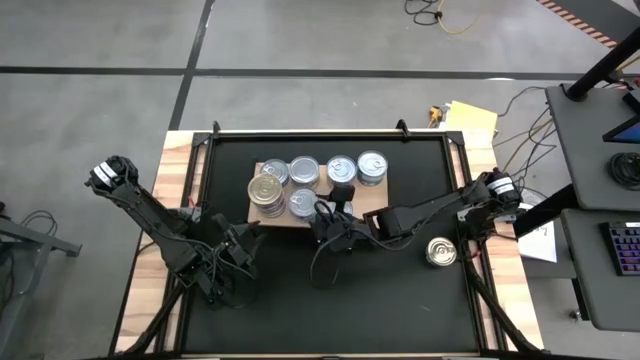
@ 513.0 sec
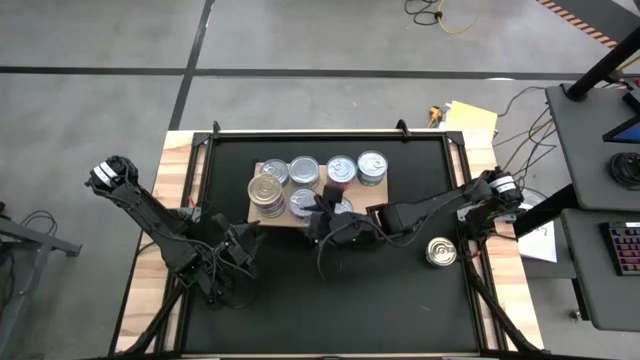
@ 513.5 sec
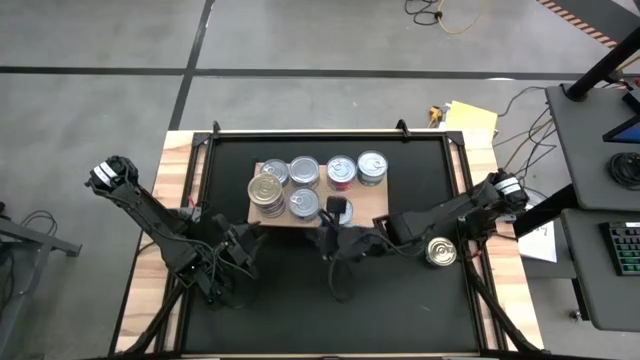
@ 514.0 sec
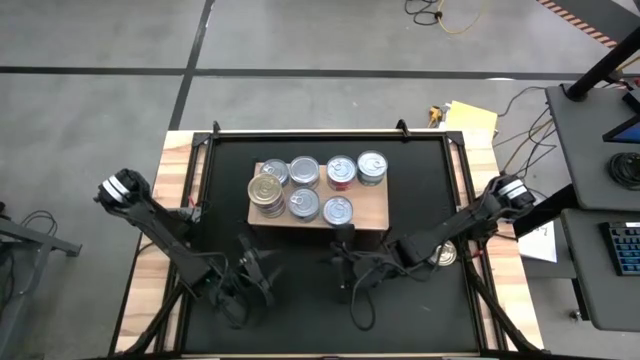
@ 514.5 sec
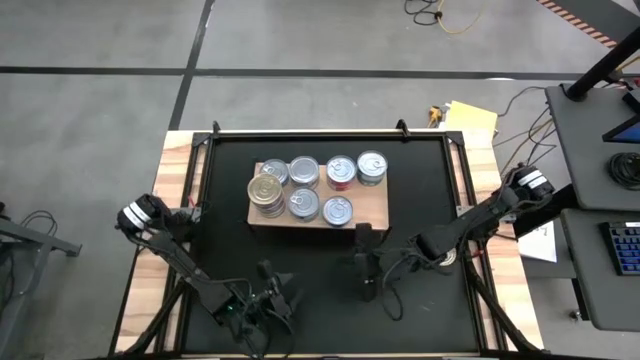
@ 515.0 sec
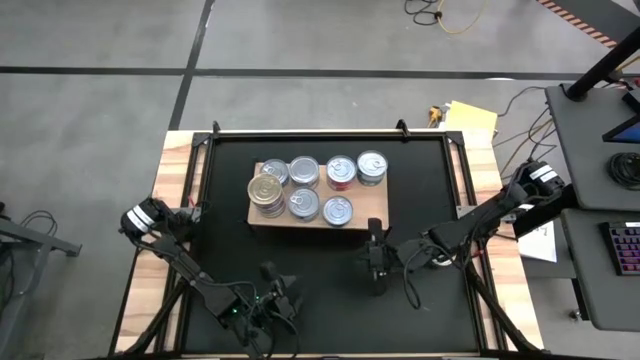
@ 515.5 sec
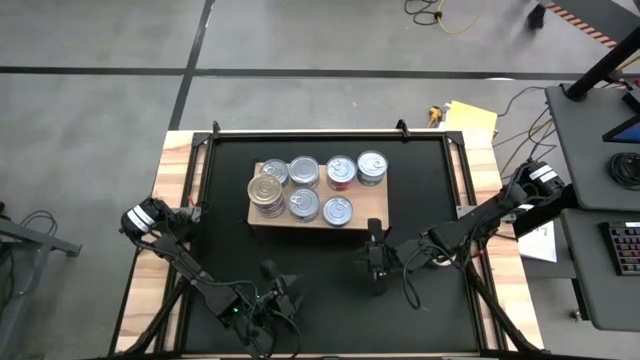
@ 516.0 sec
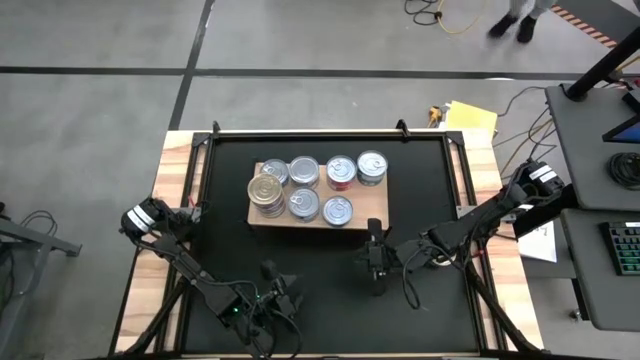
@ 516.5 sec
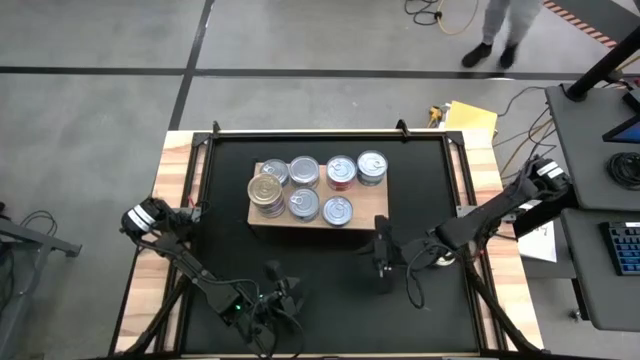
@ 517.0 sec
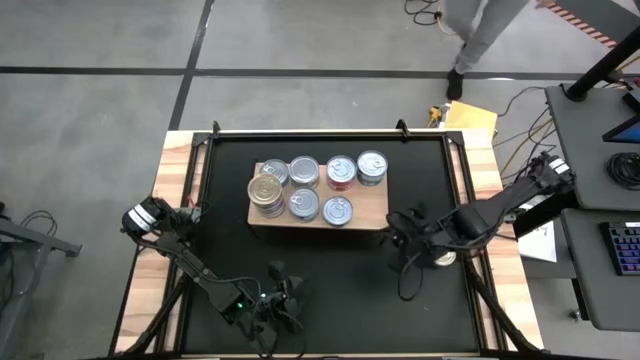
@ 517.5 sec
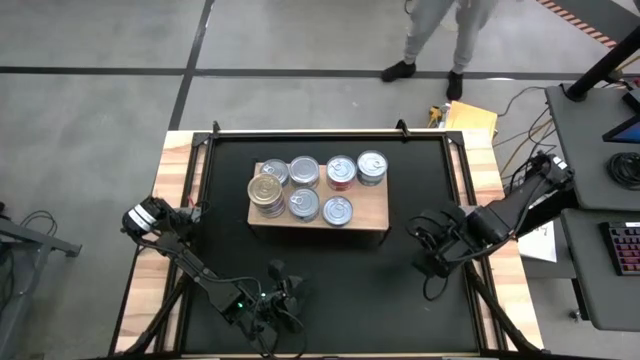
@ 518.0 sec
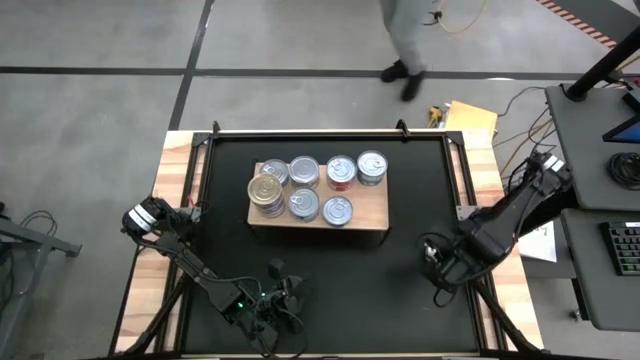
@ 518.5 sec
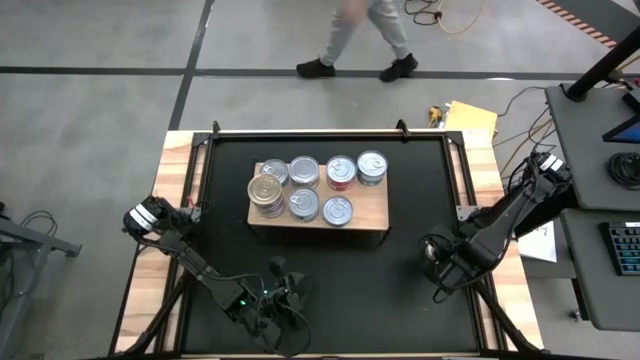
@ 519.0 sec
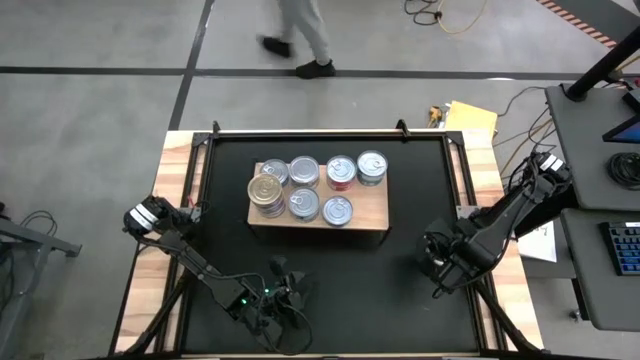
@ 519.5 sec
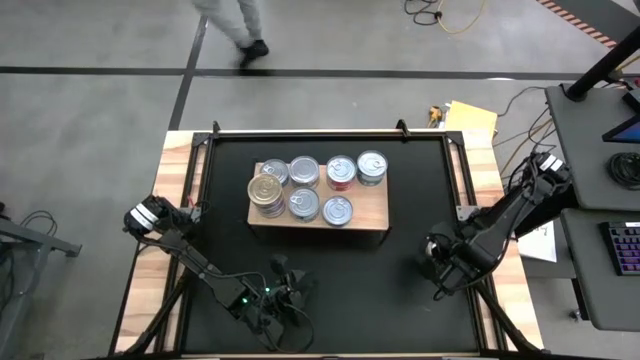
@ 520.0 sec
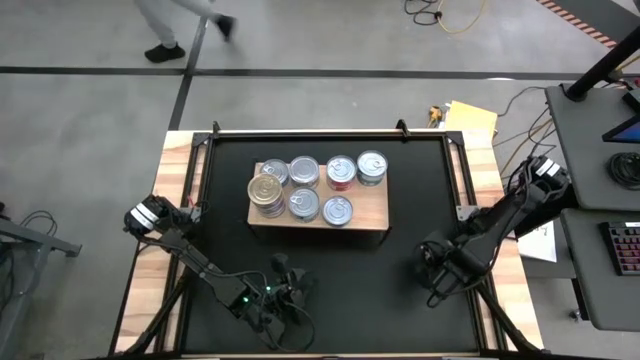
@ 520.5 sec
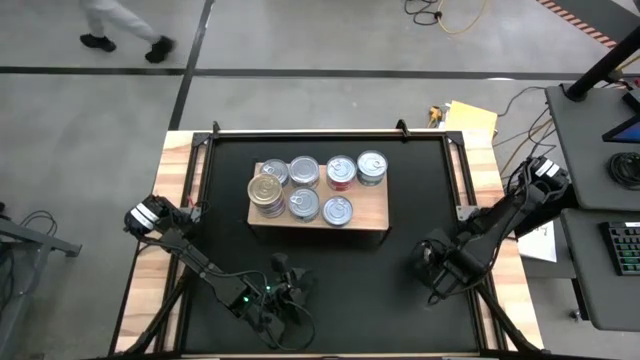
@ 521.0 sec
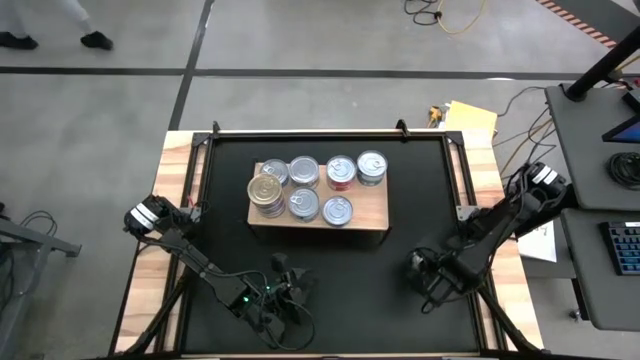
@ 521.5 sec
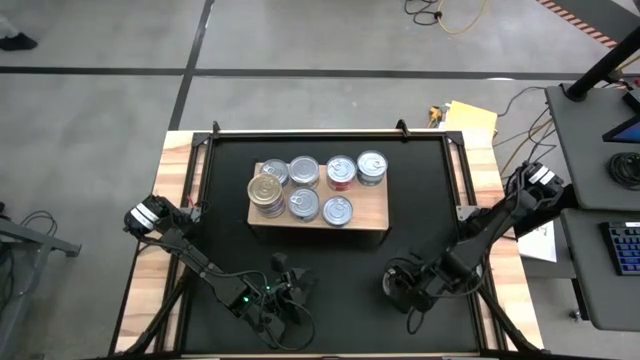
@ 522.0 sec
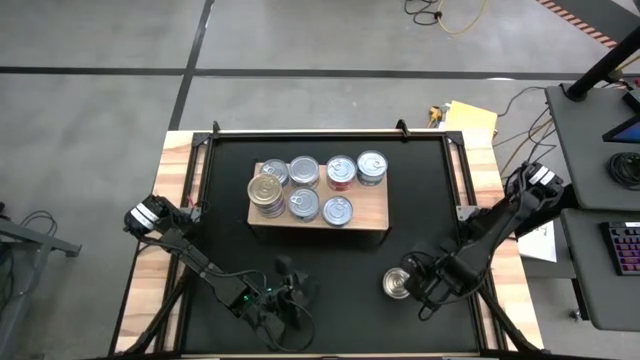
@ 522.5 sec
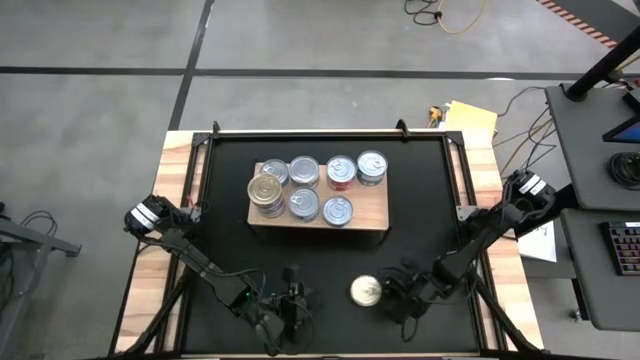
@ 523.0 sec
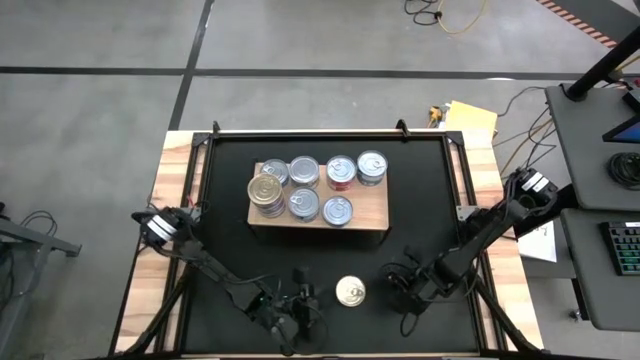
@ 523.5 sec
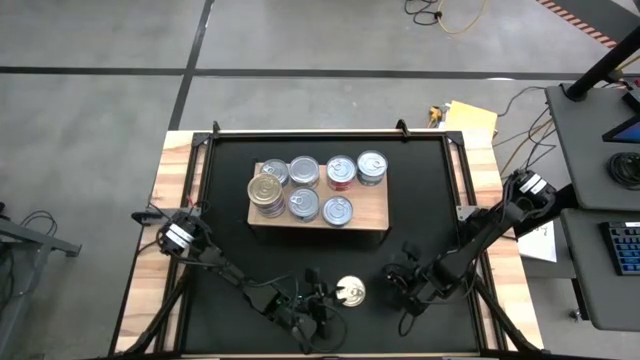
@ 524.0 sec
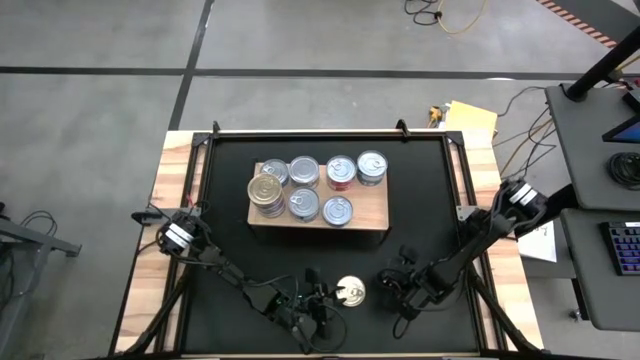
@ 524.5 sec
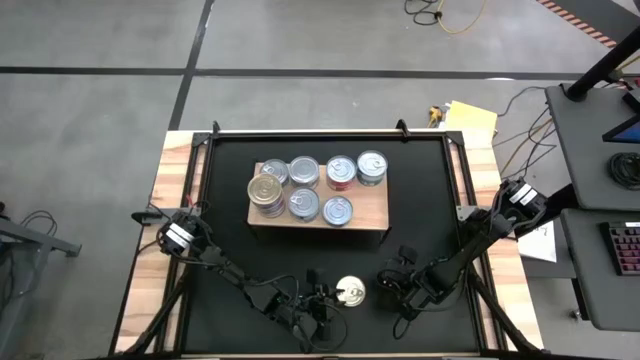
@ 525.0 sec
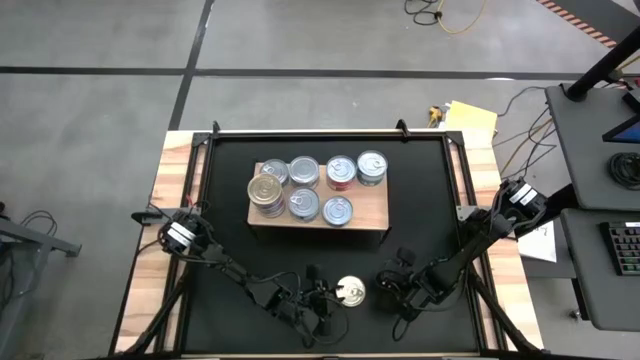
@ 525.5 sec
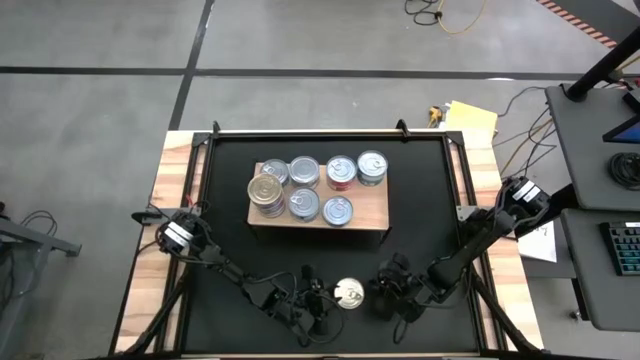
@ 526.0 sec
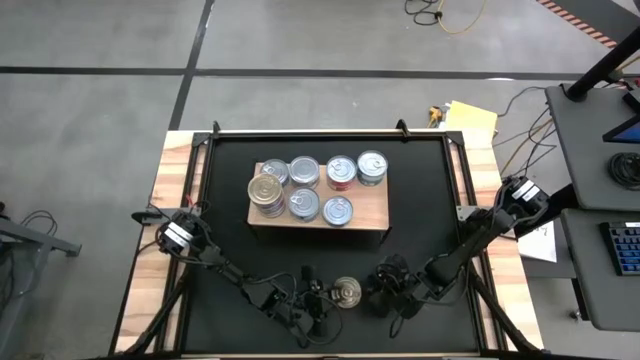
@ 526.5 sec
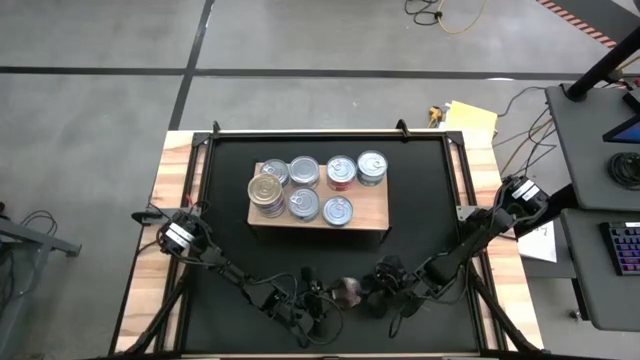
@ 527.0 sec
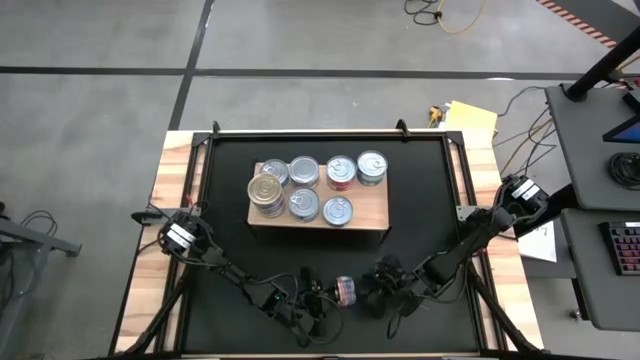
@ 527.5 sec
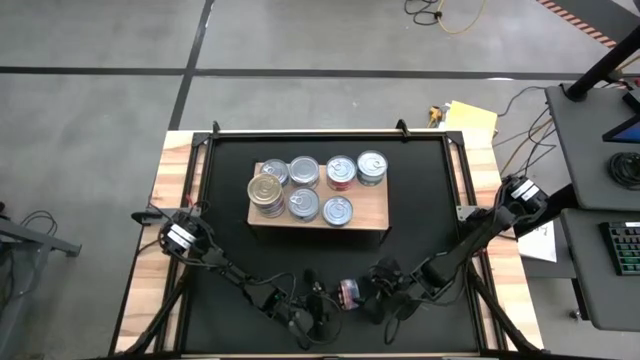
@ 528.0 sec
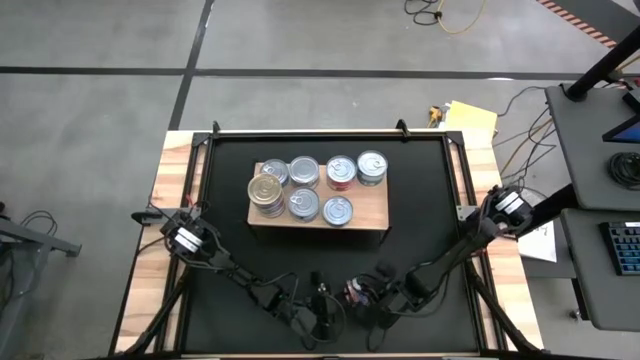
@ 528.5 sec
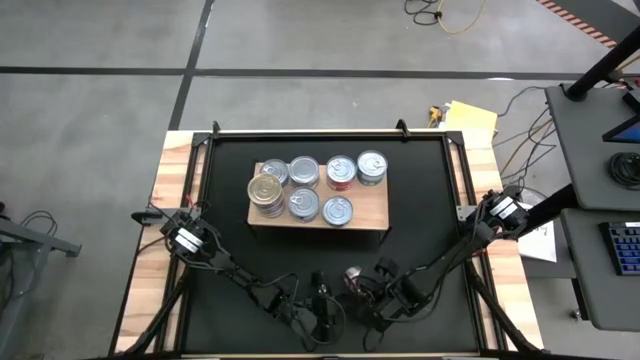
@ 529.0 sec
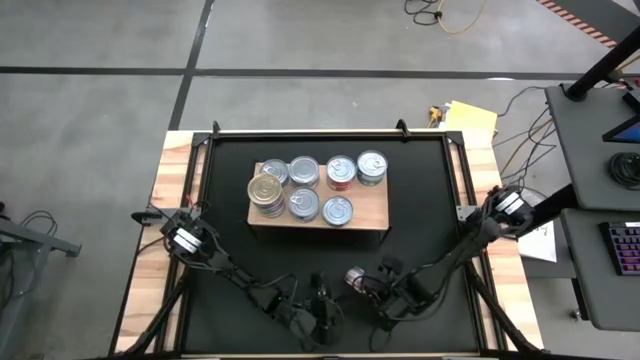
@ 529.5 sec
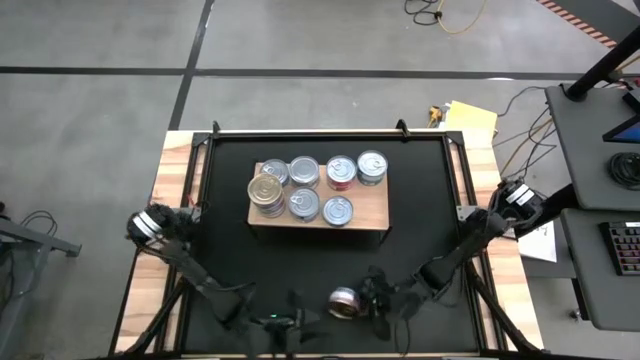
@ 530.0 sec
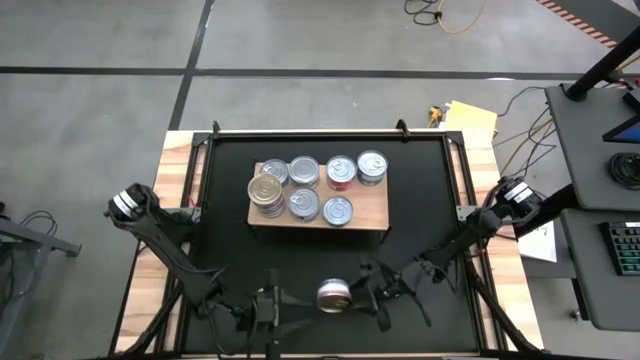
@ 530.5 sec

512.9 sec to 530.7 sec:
Task: Stack canned seafood by type on shelf
Stack the blue tuna can on the blue tuna can
